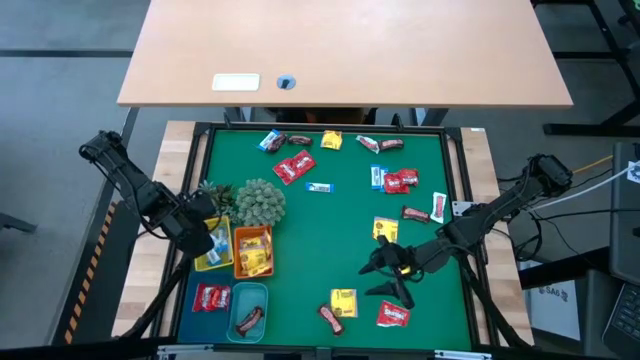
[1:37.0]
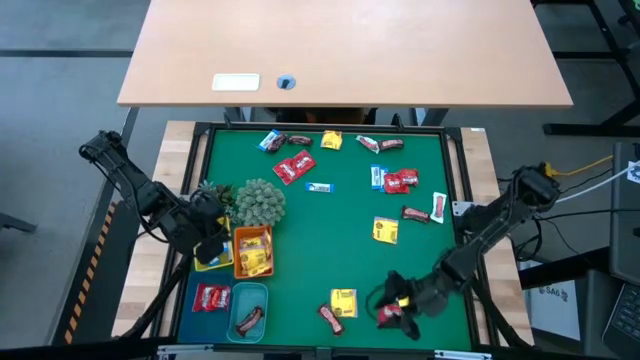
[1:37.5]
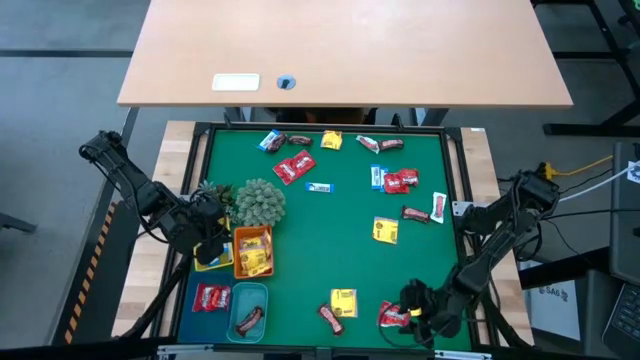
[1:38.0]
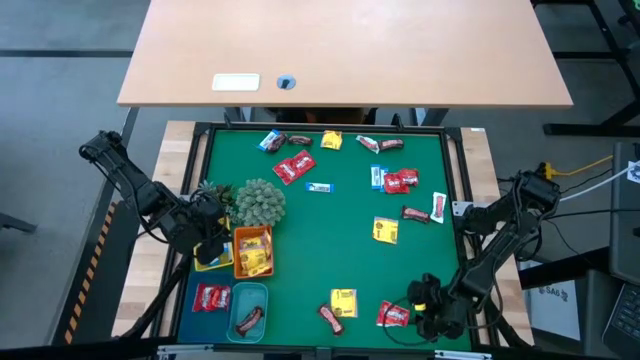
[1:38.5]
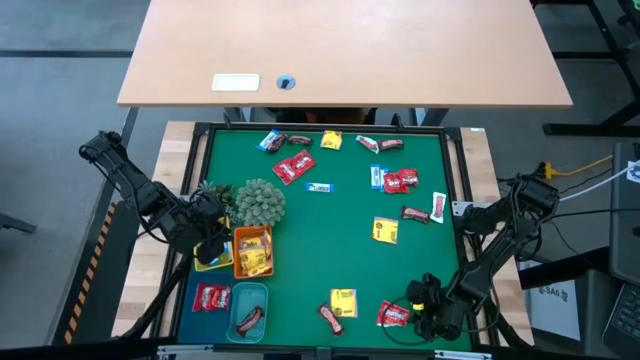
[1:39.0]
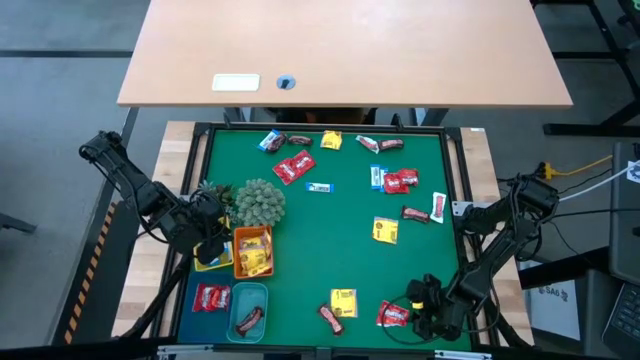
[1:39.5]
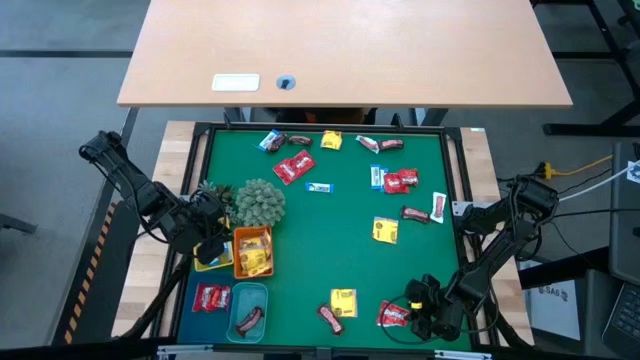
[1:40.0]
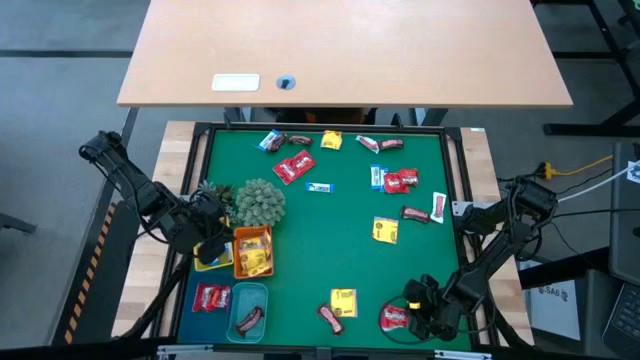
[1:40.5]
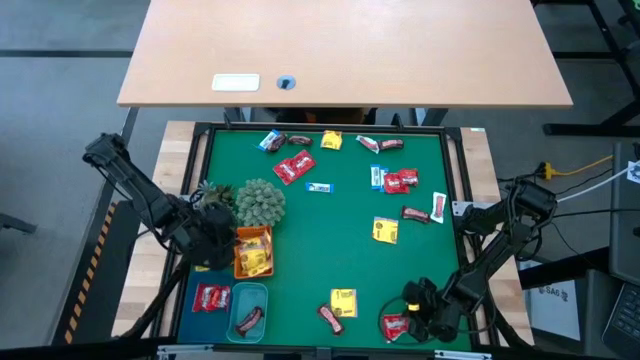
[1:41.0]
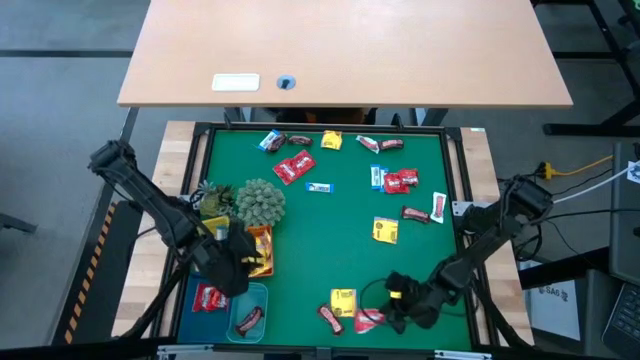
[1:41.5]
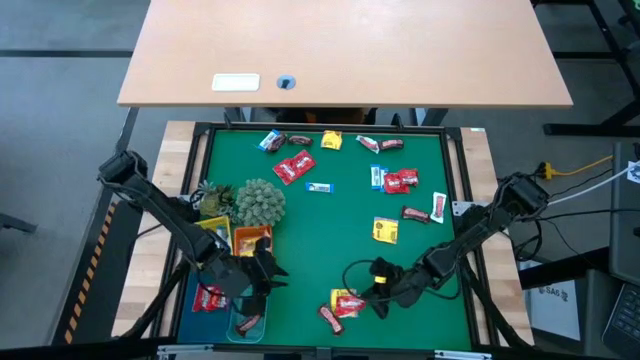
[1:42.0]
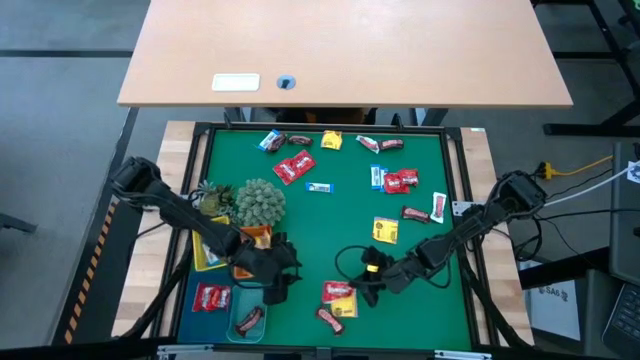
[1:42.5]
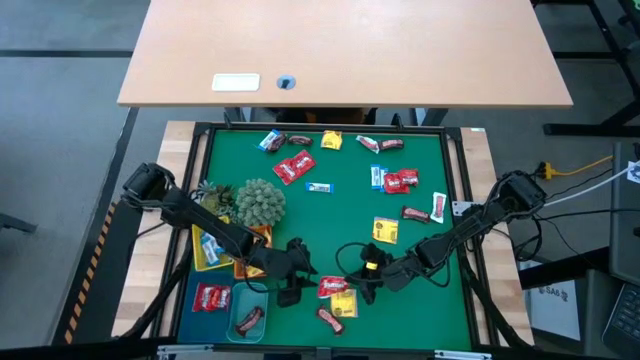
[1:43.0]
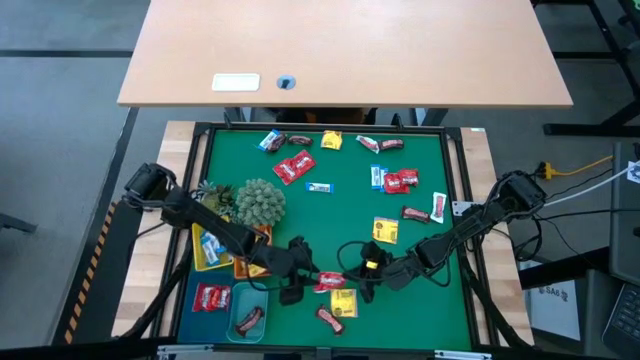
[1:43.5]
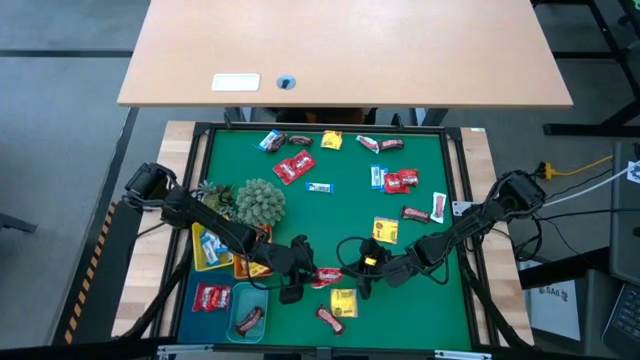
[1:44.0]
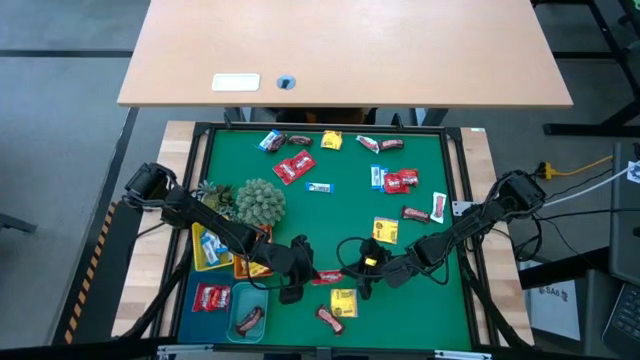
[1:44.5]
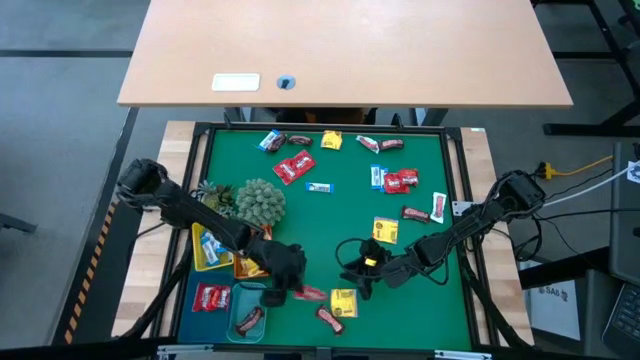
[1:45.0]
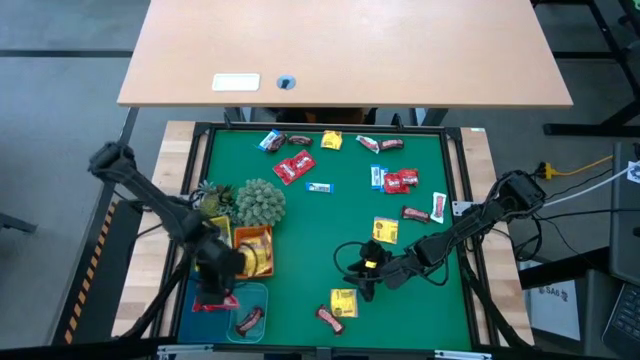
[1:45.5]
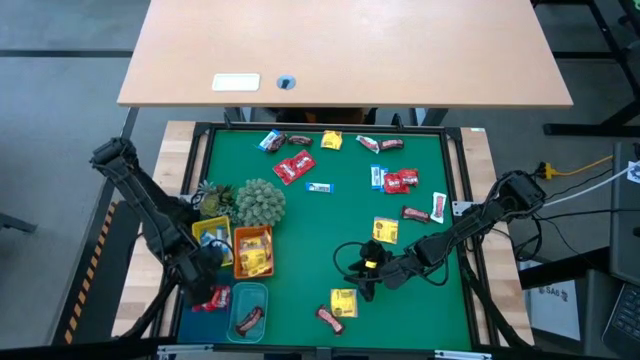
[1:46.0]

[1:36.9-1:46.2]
Task: Sort candy
Put the red candy into the blue basket

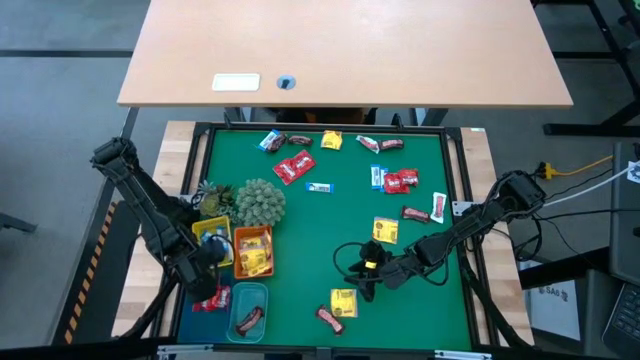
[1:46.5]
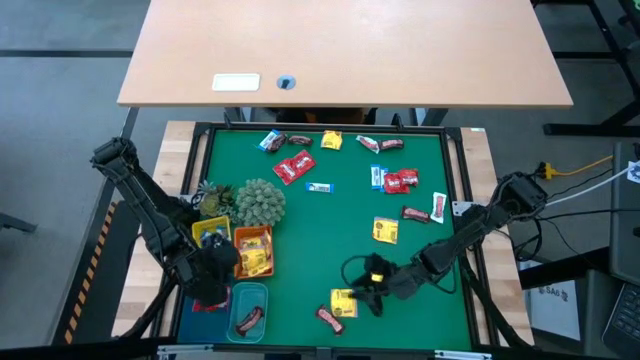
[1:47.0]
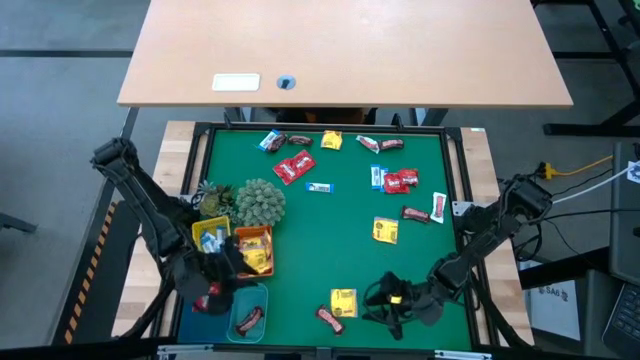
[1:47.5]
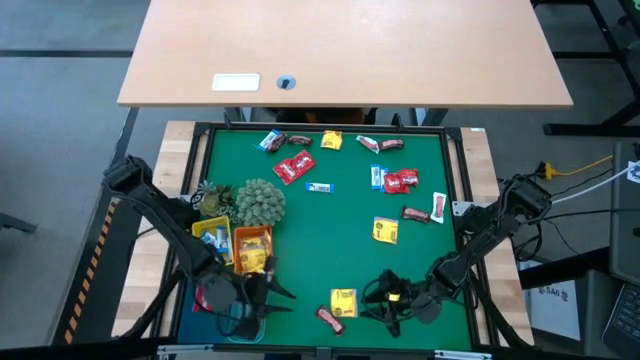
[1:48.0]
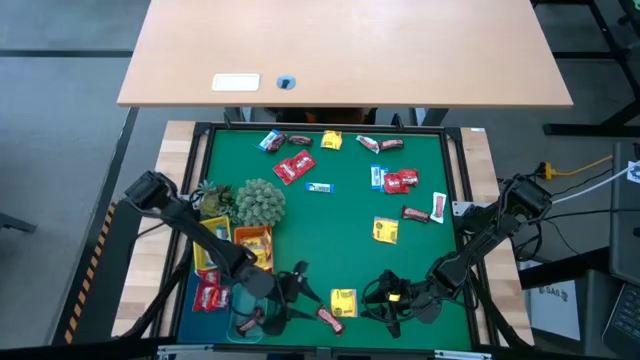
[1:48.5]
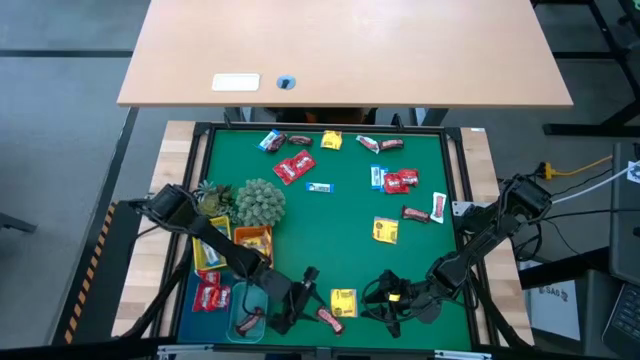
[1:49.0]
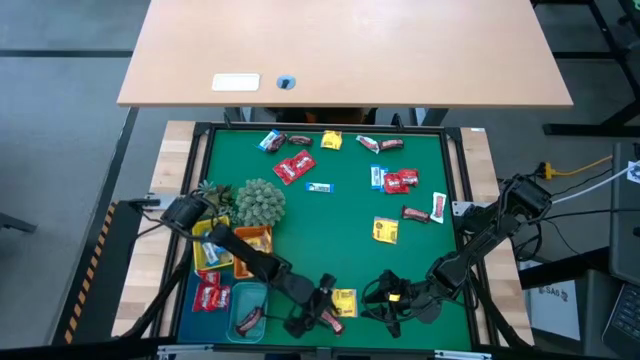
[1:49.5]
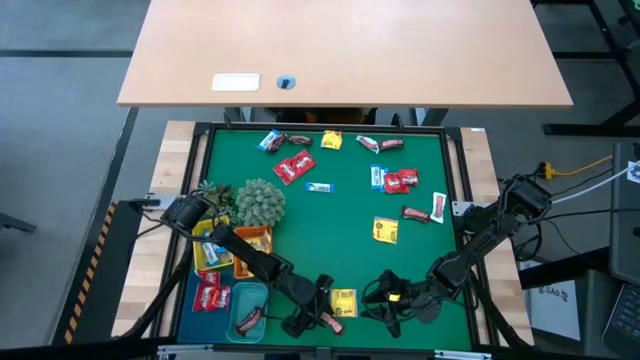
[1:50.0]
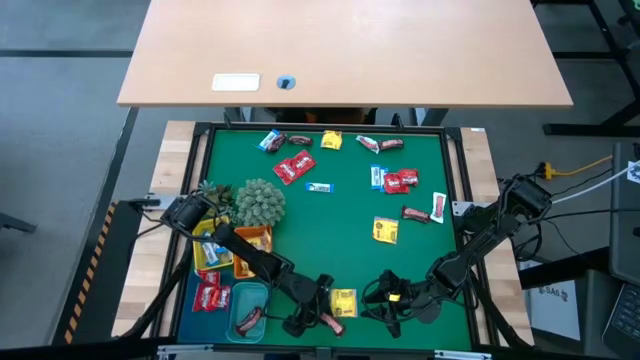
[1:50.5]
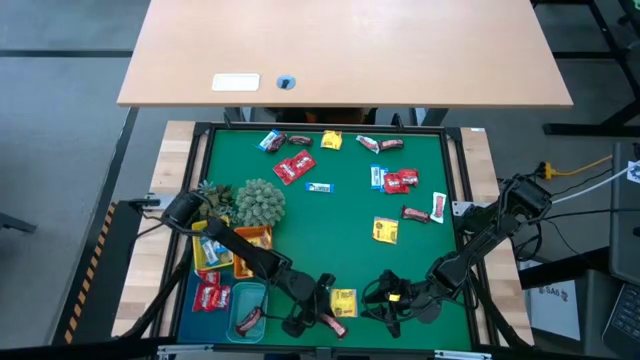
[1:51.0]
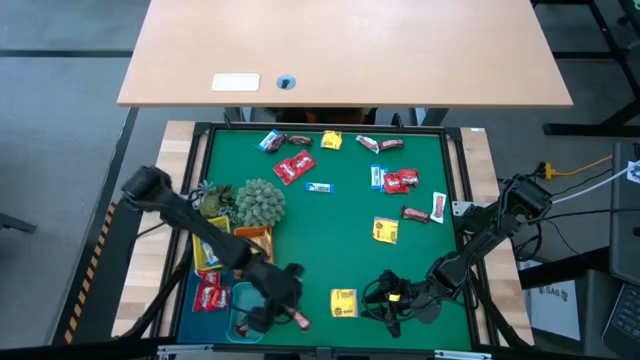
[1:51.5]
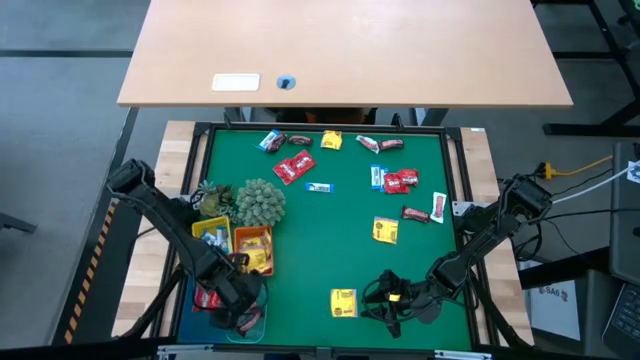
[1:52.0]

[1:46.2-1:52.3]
Put the brown chocolate into the green basket

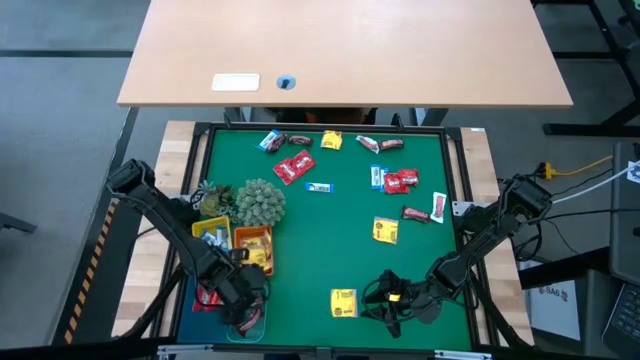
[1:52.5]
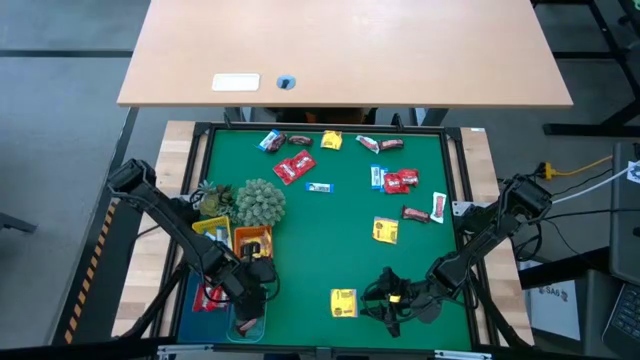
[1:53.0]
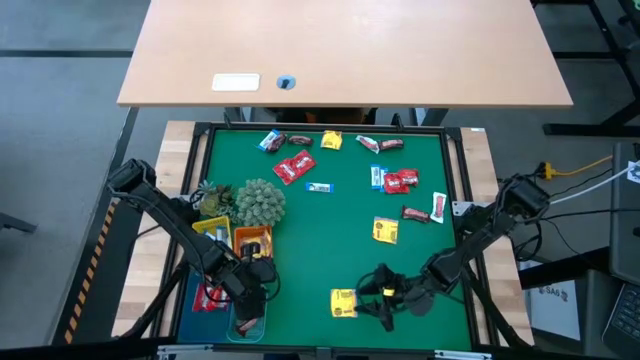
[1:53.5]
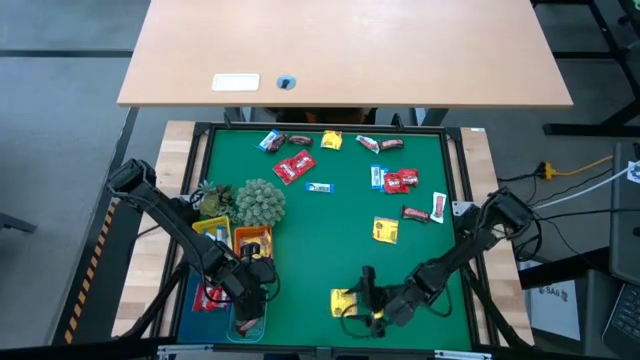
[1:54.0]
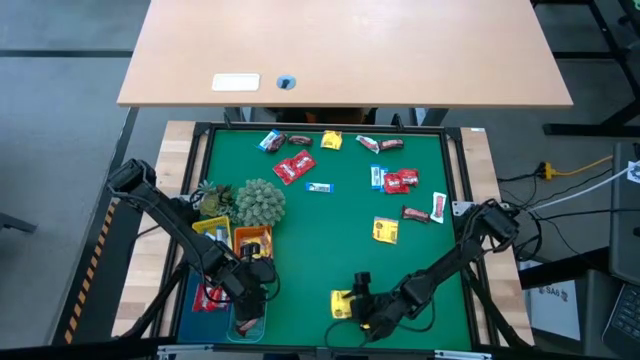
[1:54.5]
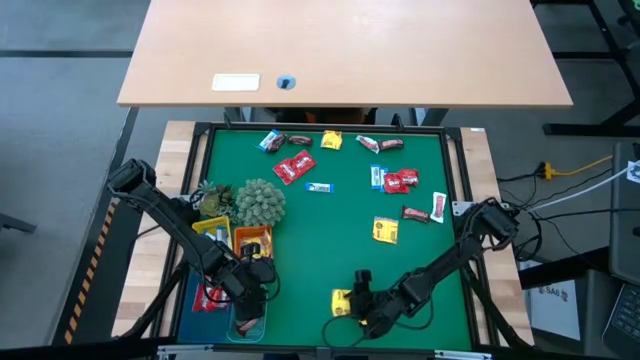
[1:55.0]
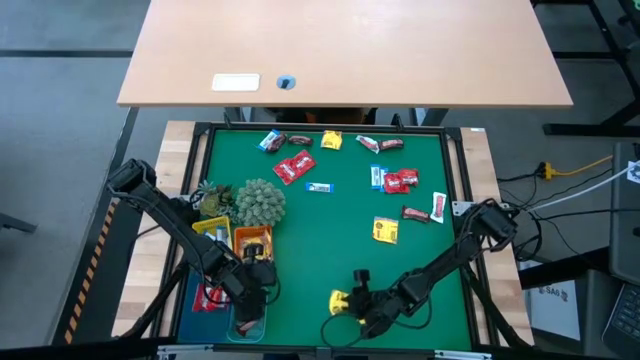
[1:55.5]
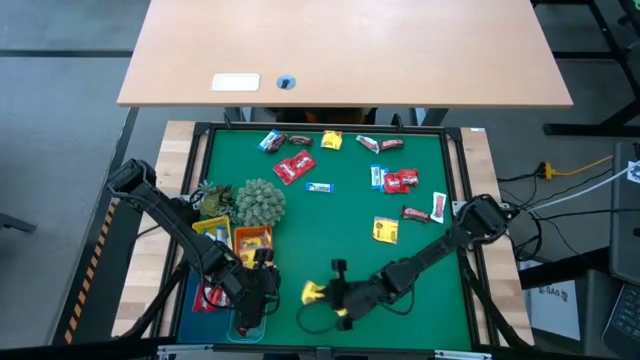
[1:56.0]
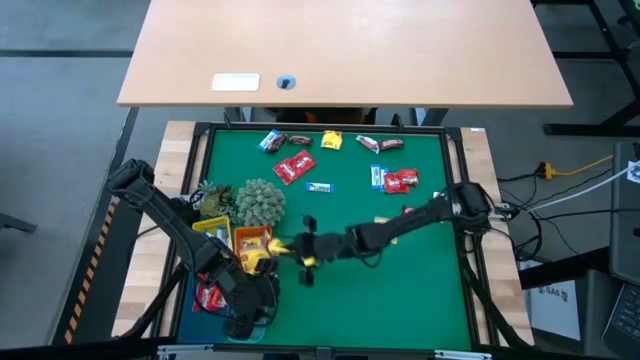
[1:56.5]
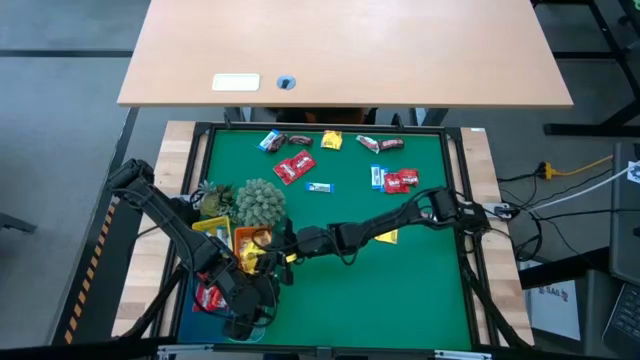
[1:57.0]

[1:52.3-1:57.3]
Put the yellow candy into the orange basket

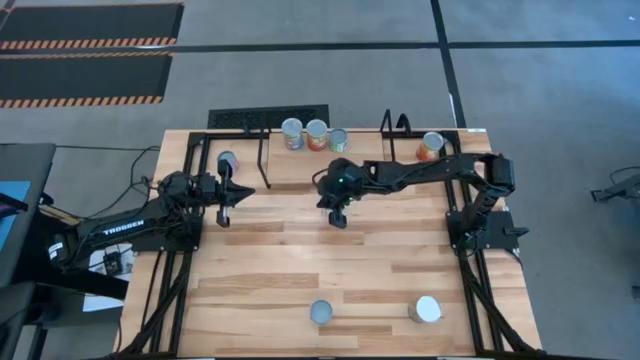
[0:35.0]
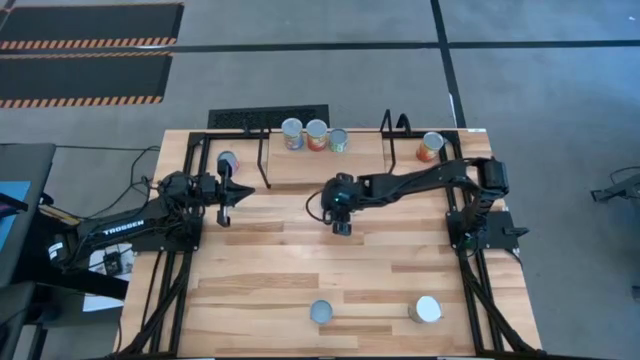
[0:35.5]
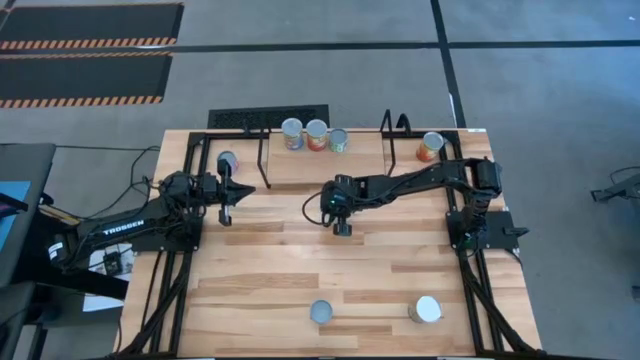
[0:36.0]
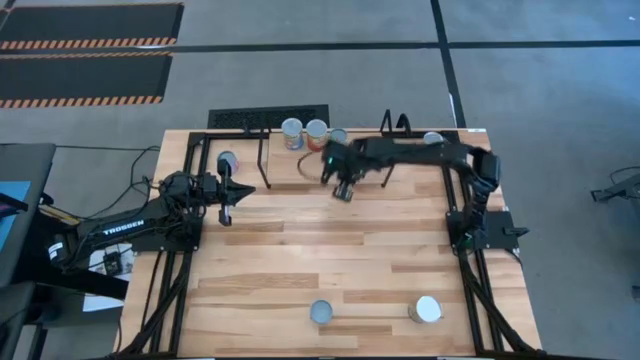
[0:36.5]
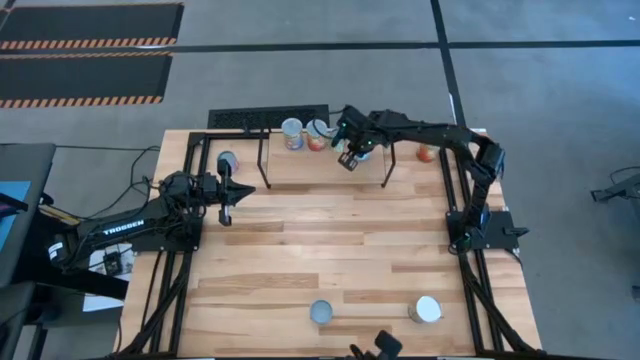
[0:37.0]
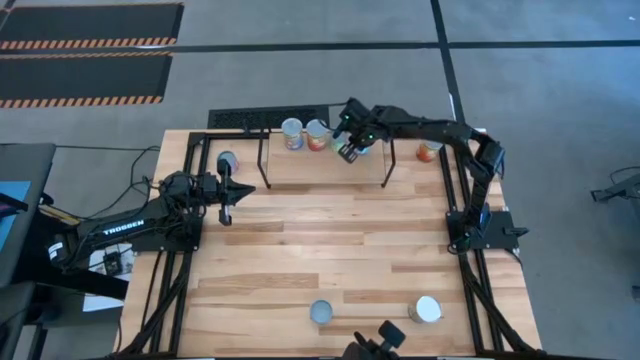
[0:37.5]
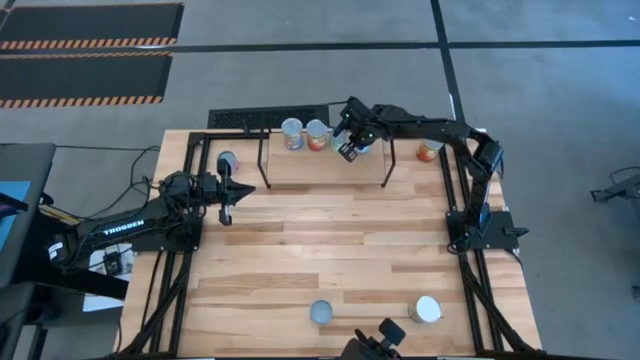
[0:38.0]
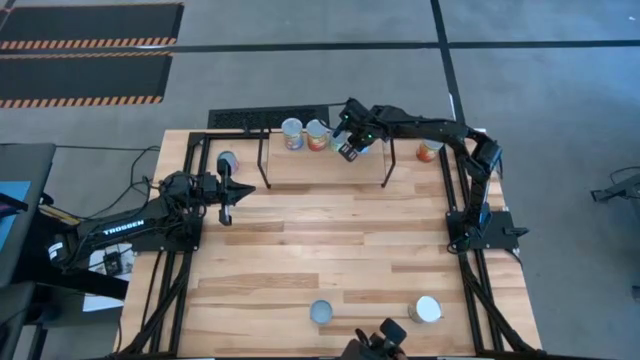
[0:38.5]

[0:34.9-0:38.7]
Task: Pick and place cans onto a shelf
Put the canned carrots on the shelf
